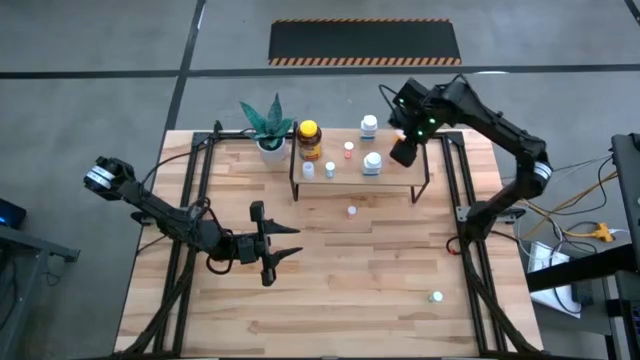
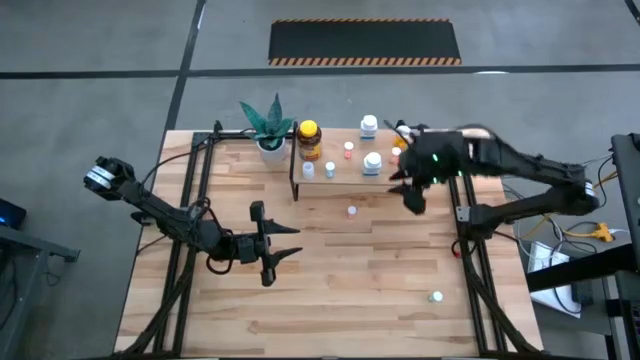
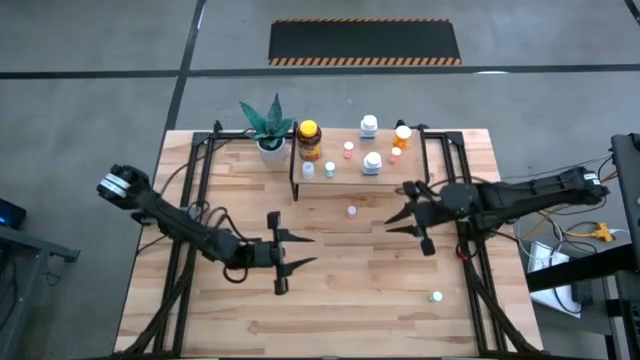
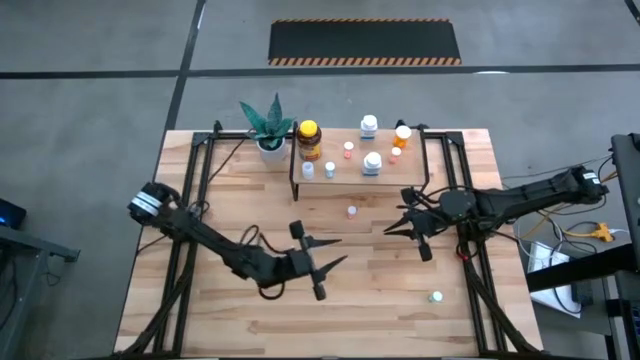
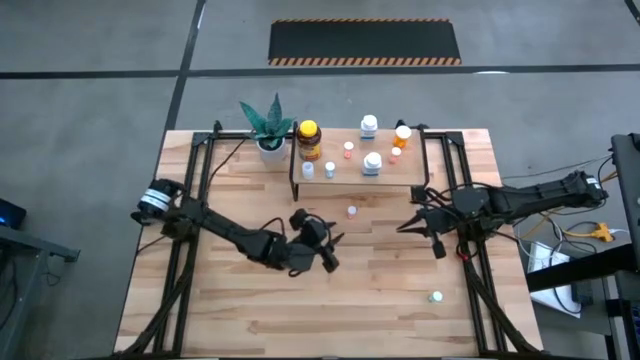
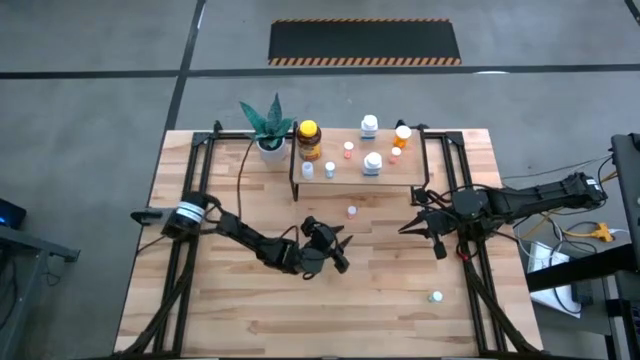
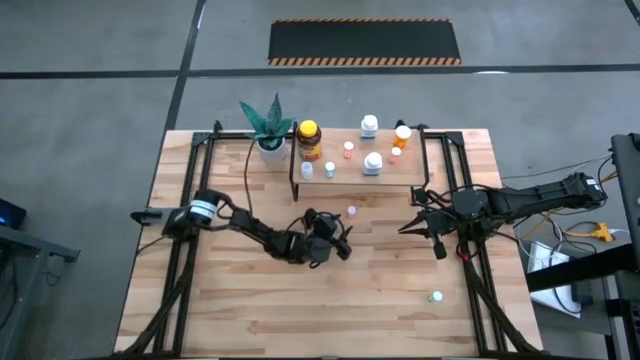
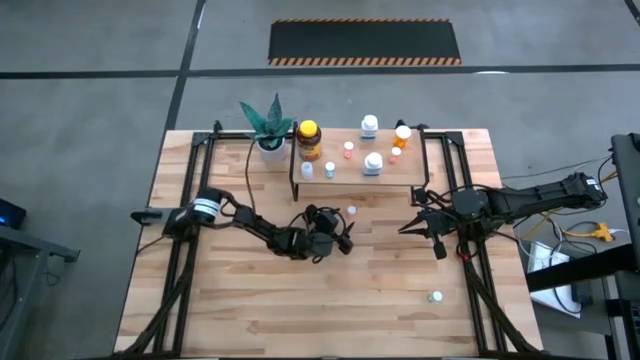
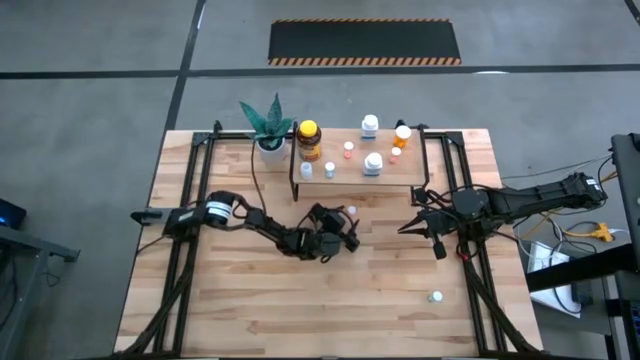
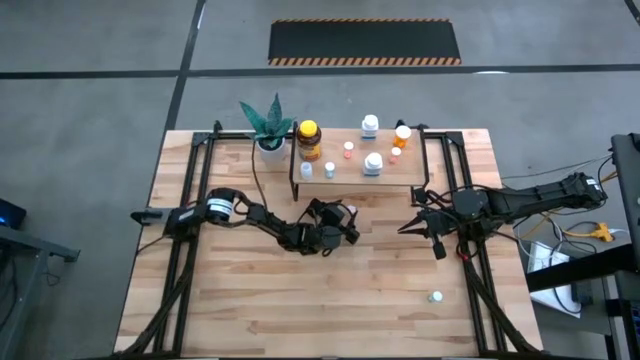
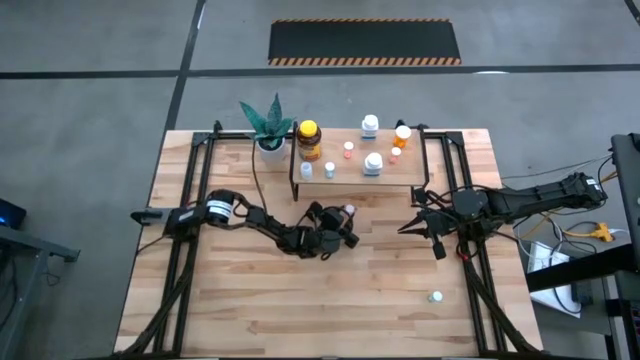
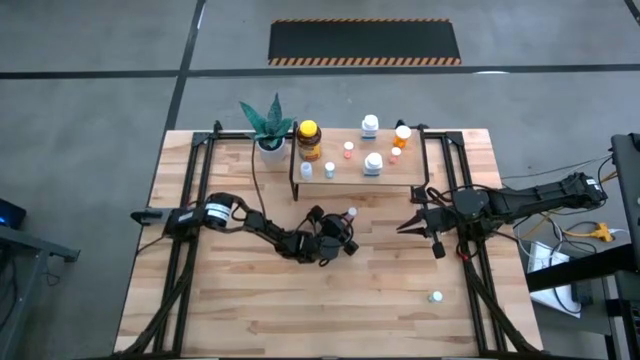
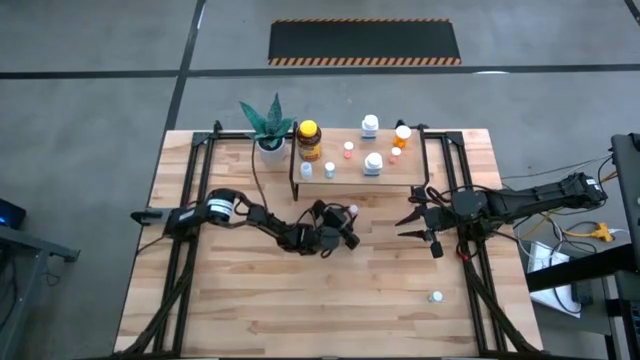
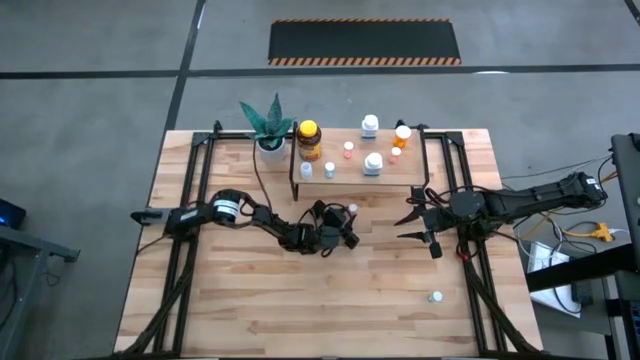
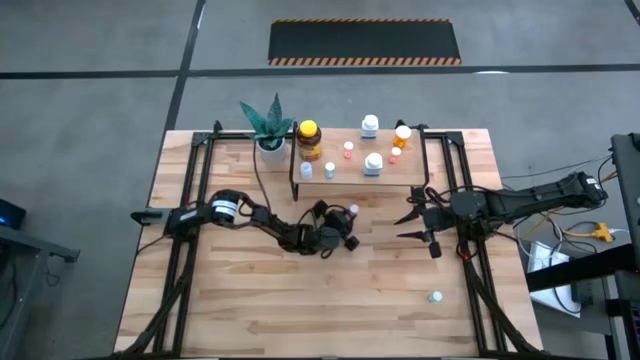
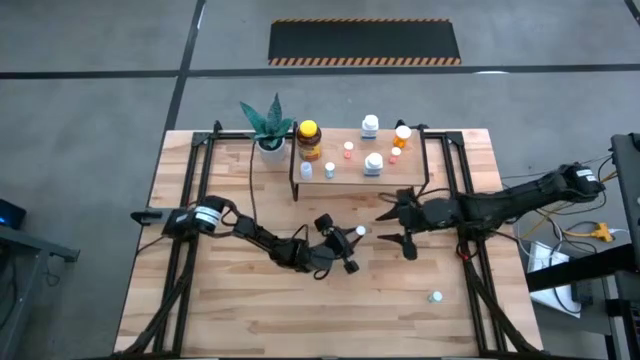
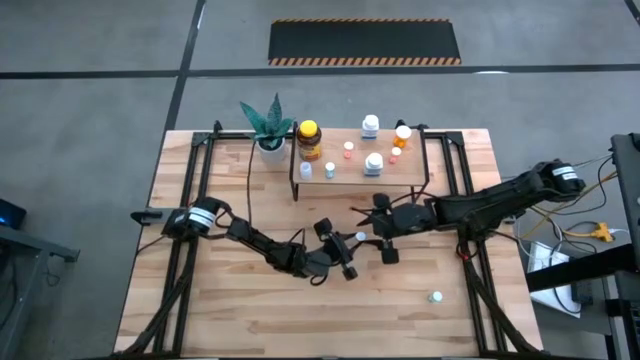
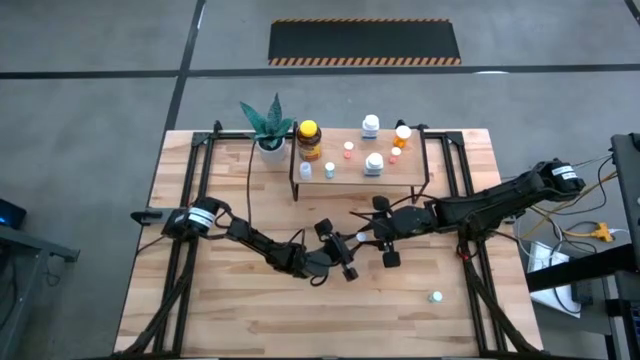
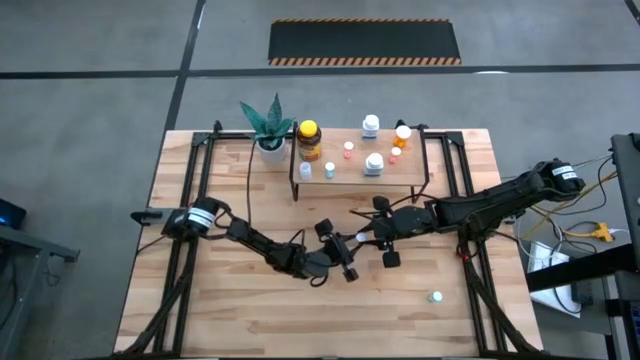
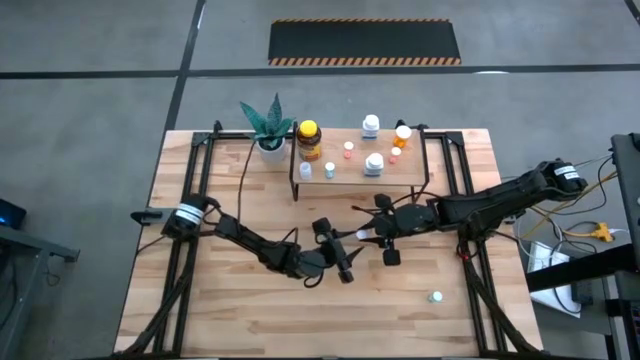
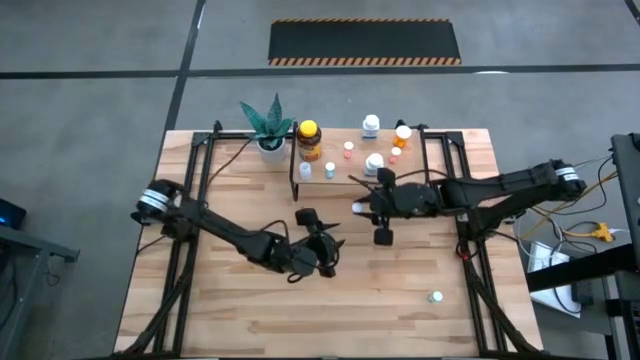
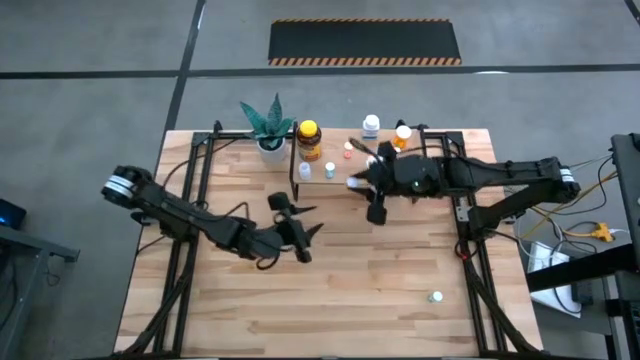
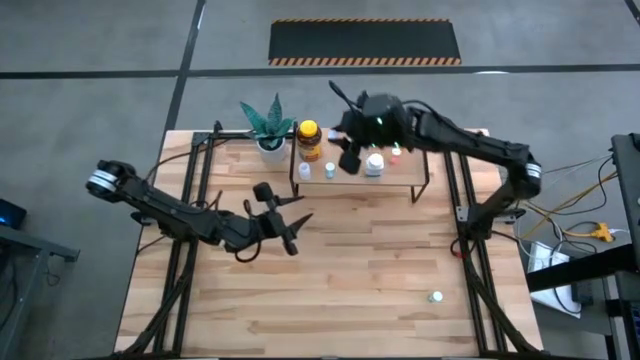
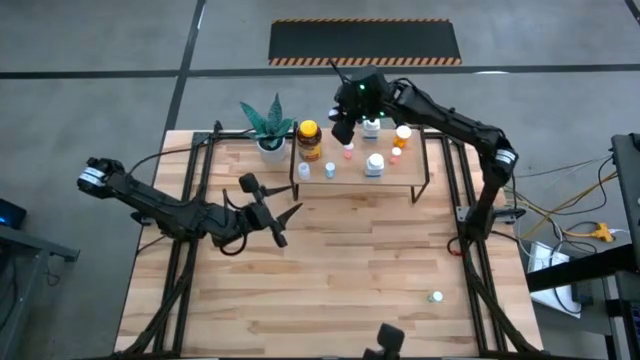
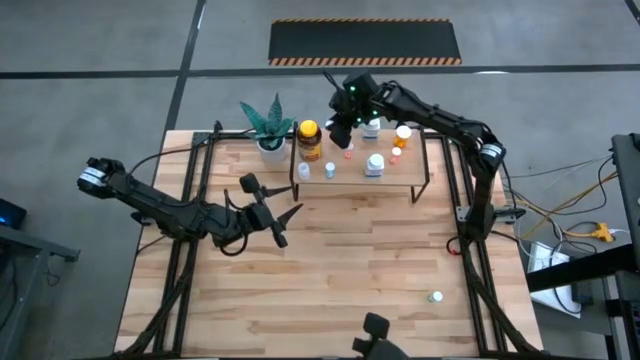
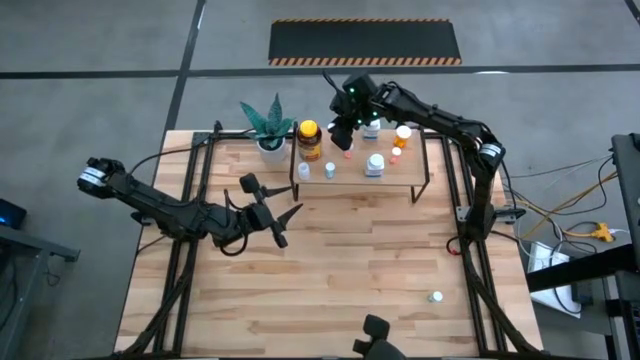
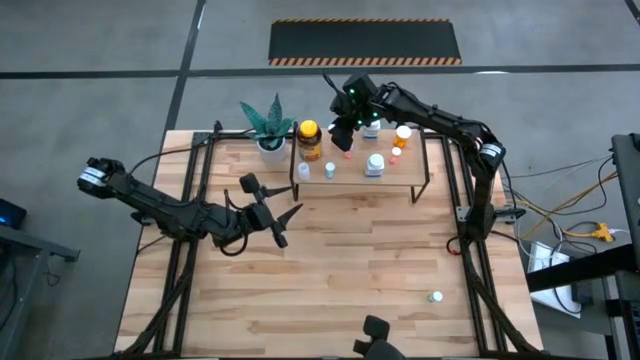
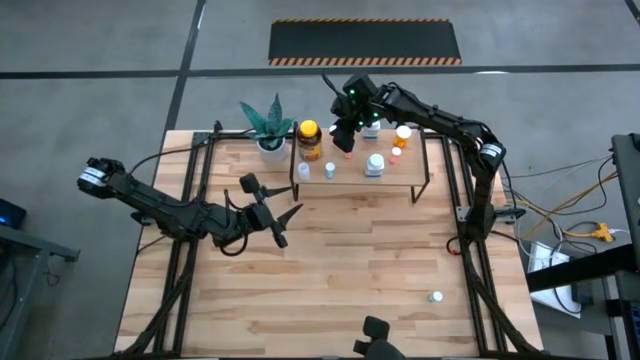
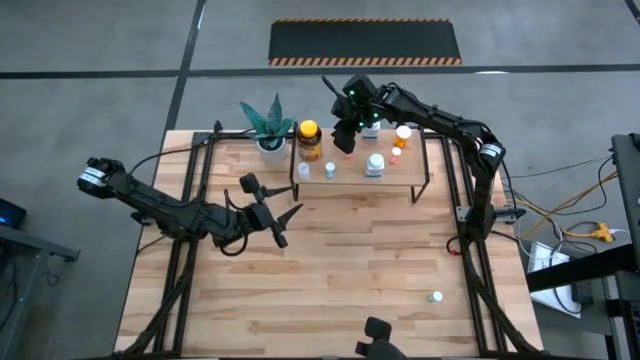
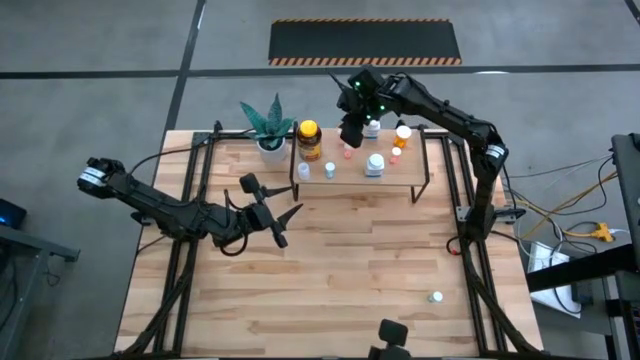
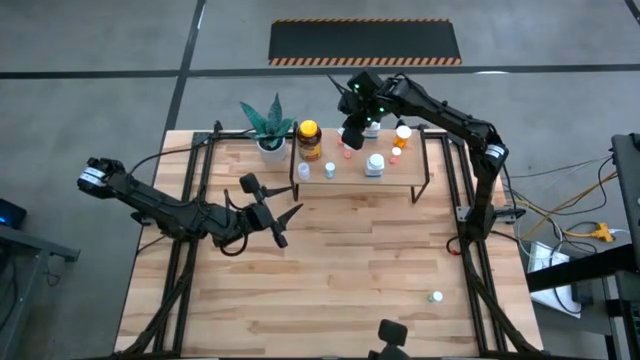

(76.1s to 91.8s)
Task: Pick and place medicine bottles onto shelf by color
Put the pink medicine bottle on the shelf

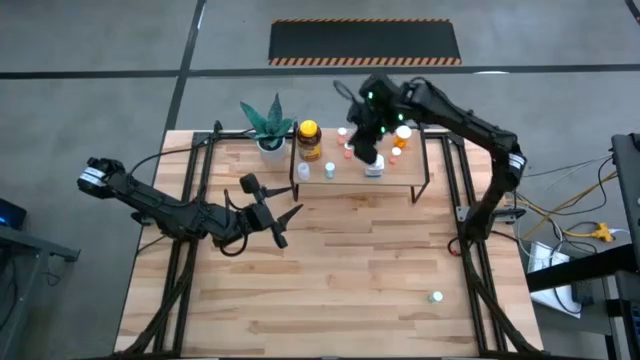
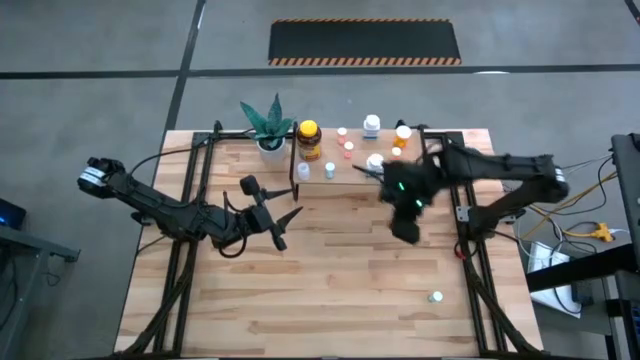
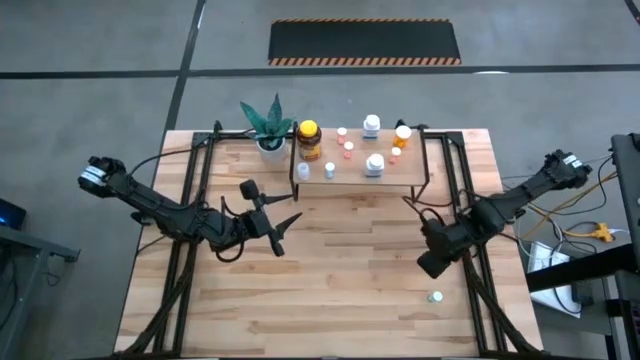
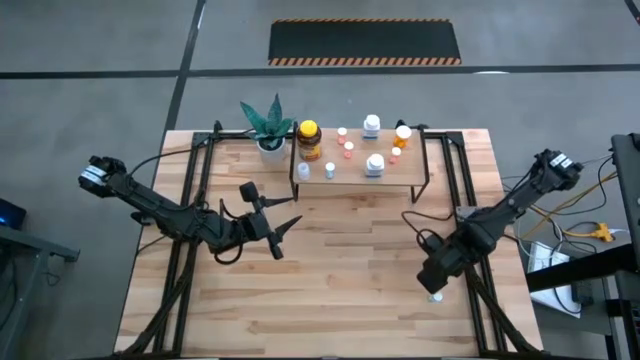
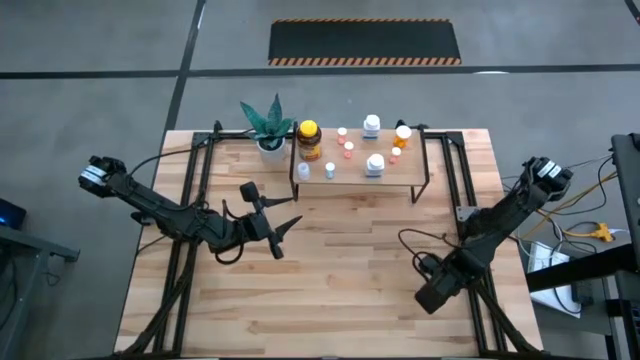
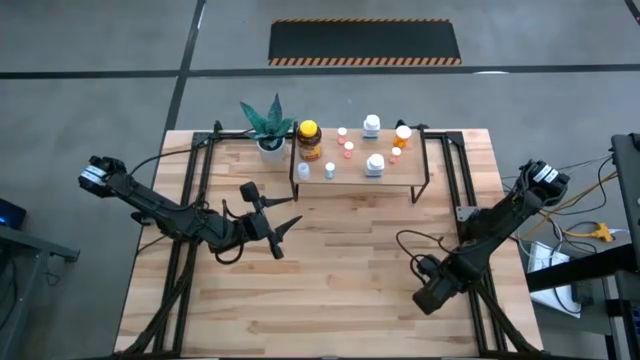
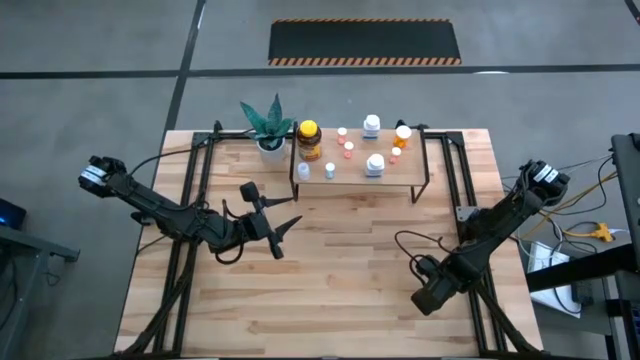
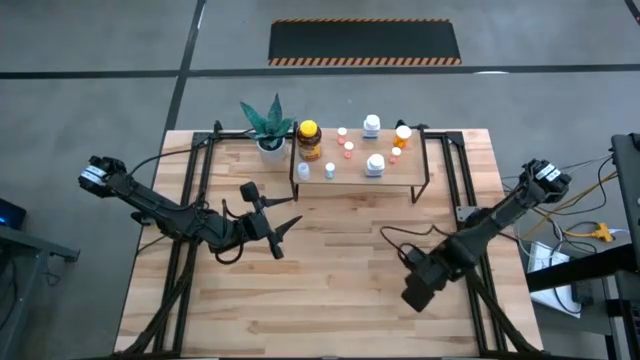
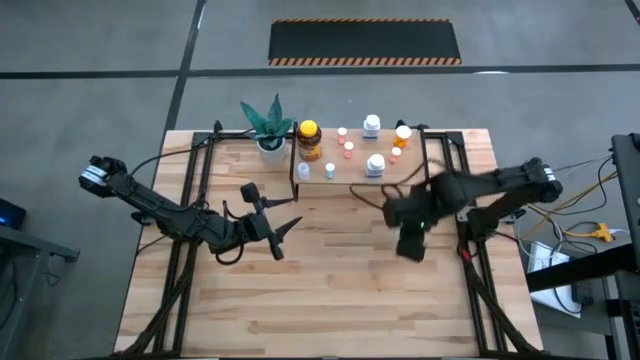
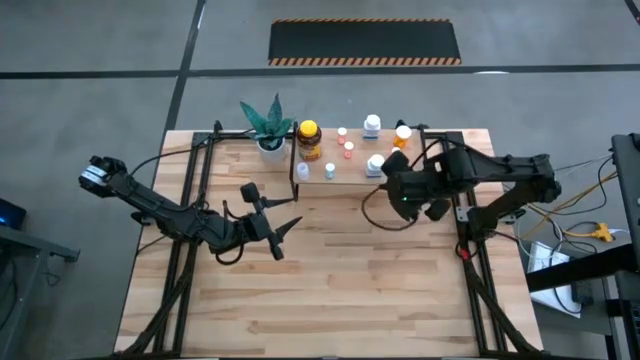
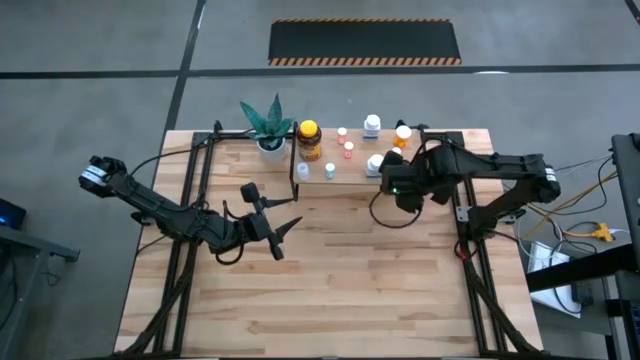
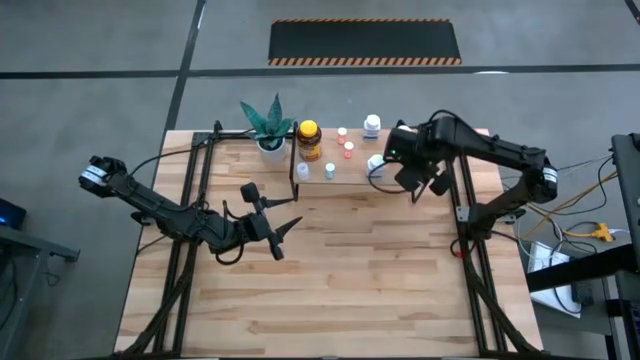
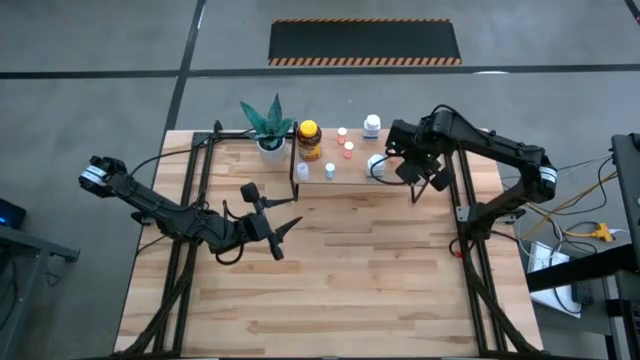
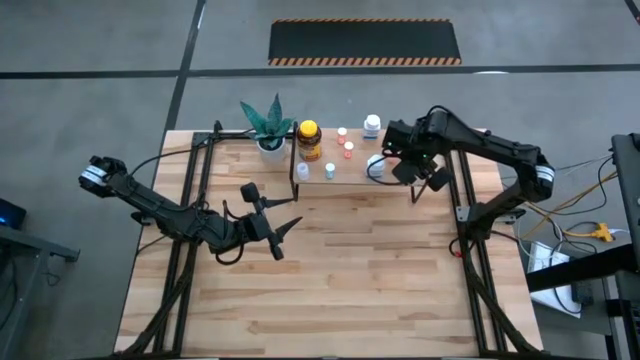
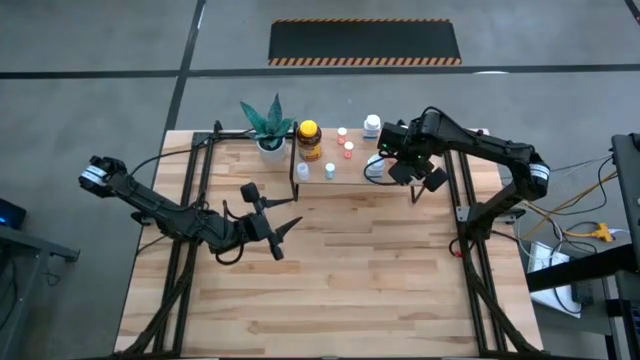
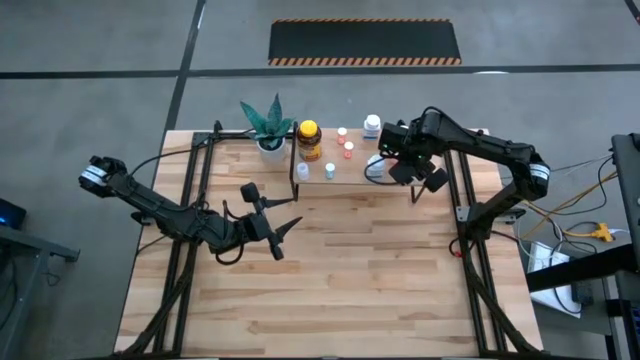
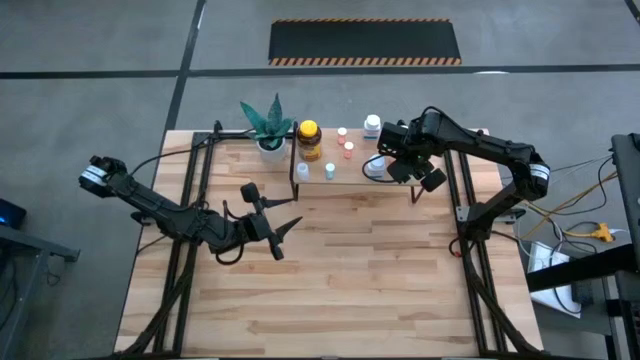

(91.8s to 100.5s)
Put the blue medicine bottle on the shelf
